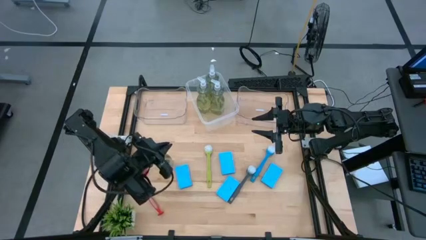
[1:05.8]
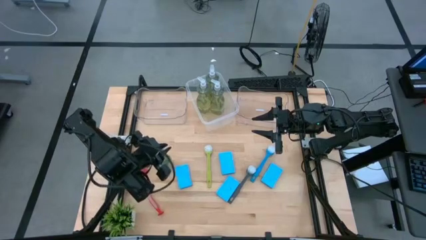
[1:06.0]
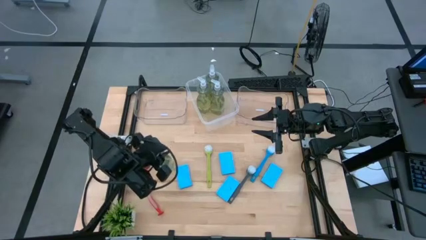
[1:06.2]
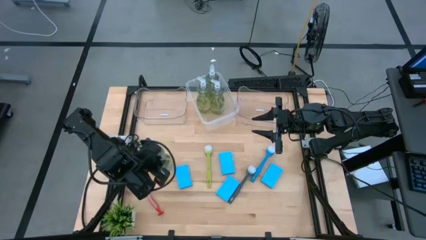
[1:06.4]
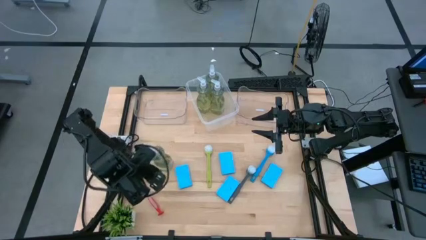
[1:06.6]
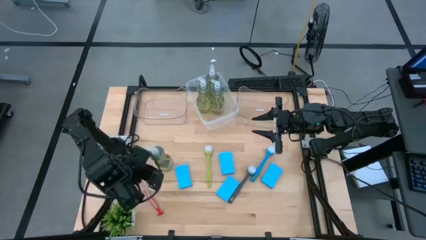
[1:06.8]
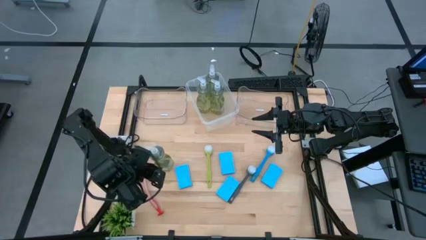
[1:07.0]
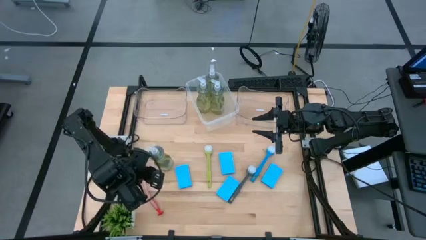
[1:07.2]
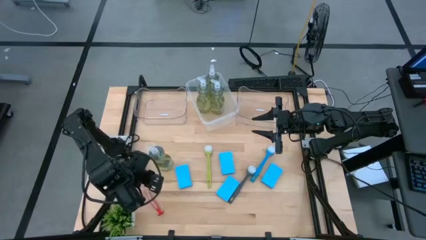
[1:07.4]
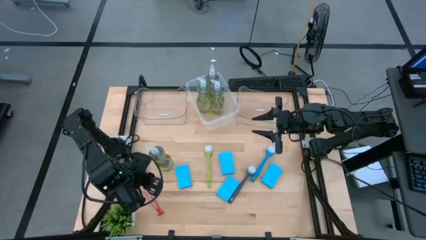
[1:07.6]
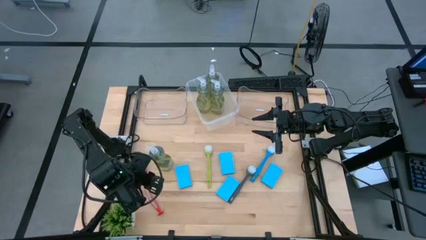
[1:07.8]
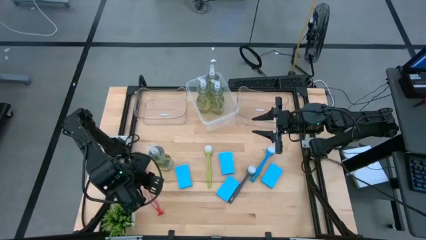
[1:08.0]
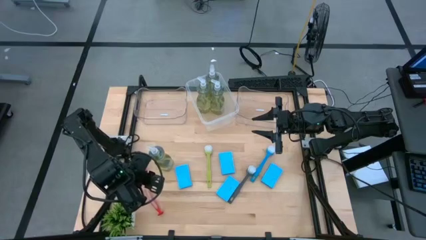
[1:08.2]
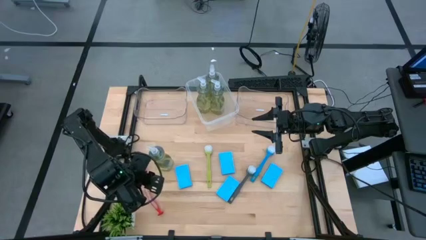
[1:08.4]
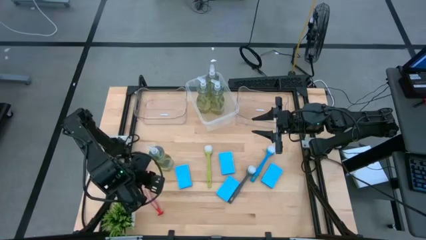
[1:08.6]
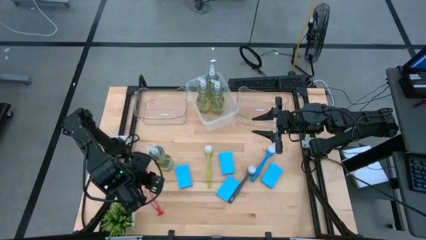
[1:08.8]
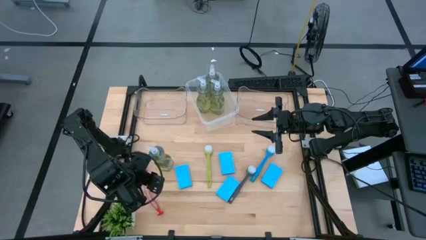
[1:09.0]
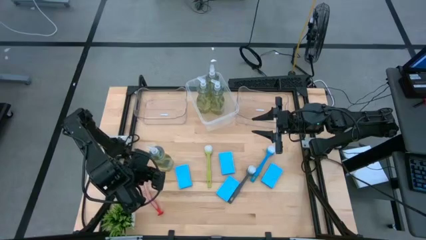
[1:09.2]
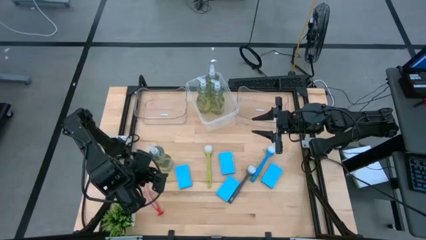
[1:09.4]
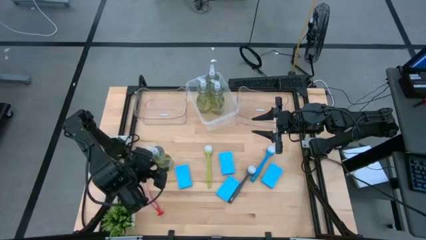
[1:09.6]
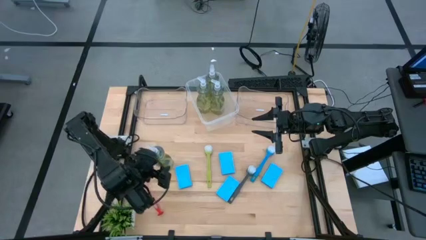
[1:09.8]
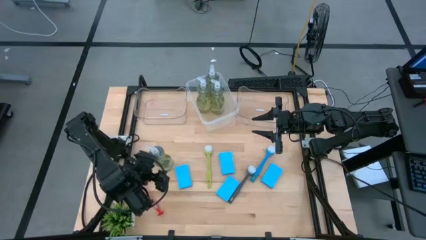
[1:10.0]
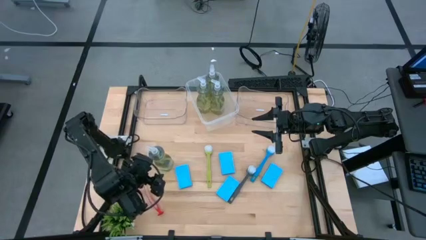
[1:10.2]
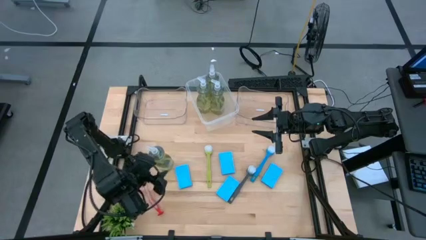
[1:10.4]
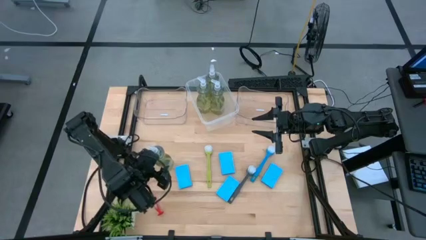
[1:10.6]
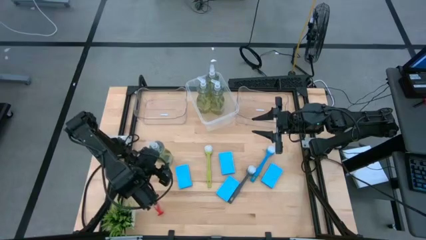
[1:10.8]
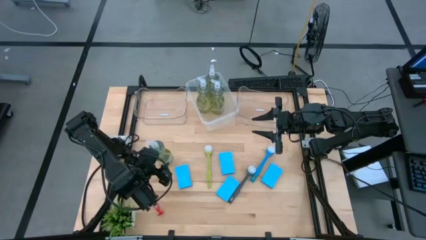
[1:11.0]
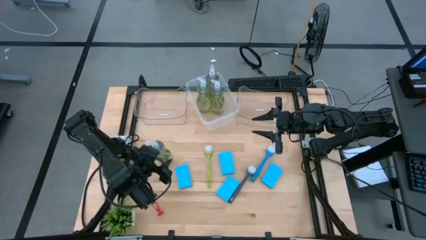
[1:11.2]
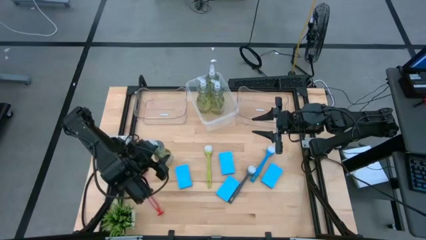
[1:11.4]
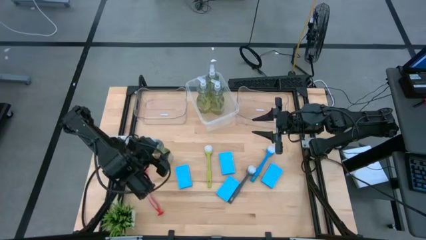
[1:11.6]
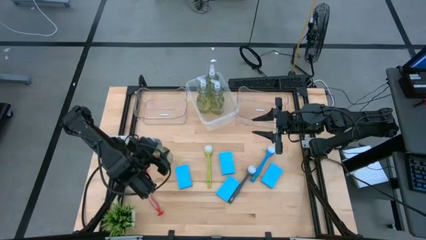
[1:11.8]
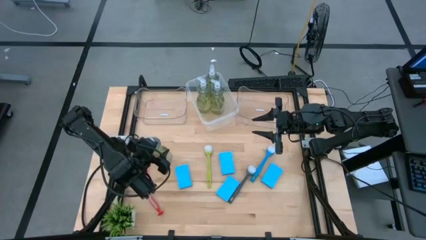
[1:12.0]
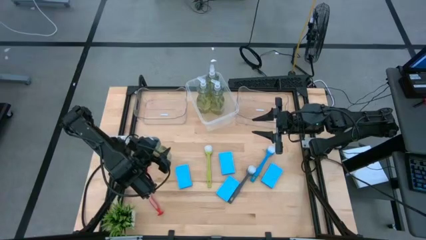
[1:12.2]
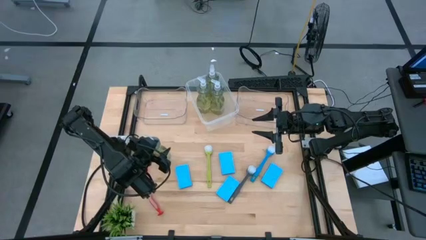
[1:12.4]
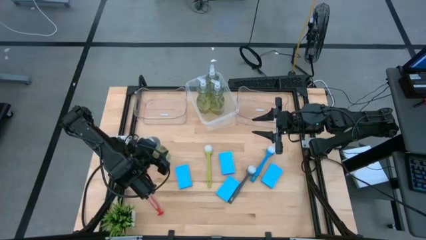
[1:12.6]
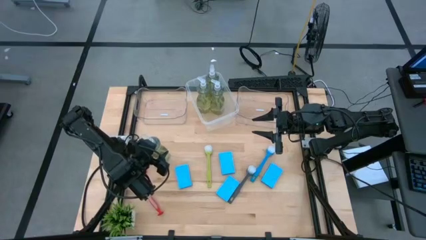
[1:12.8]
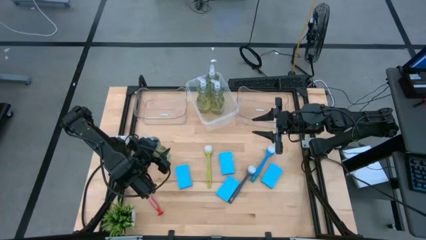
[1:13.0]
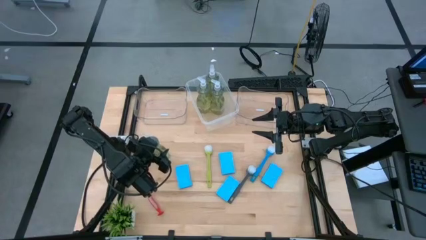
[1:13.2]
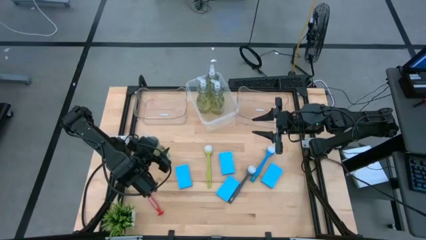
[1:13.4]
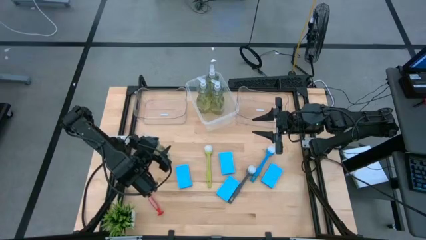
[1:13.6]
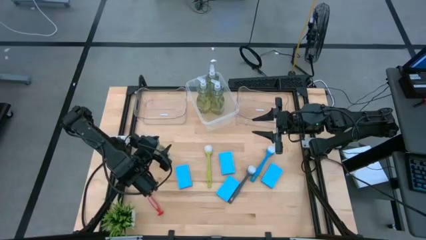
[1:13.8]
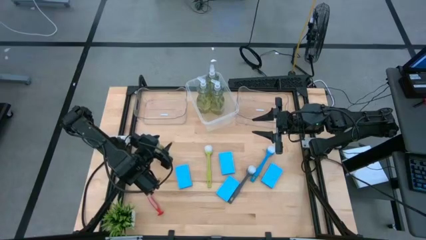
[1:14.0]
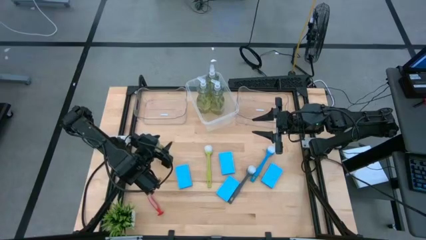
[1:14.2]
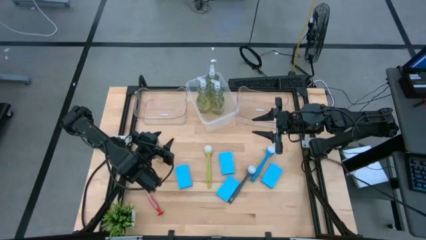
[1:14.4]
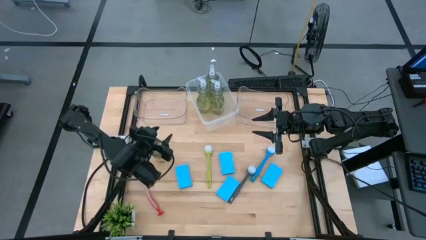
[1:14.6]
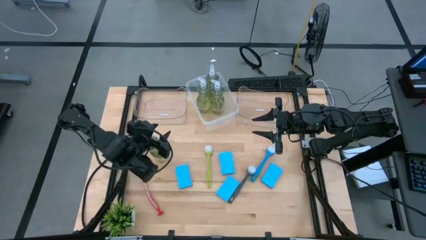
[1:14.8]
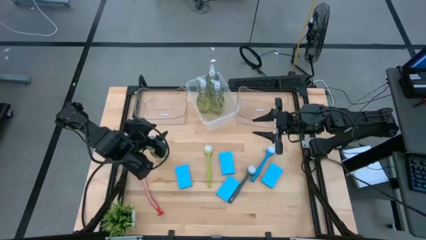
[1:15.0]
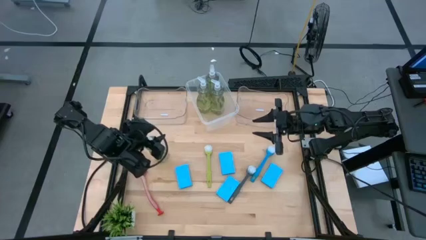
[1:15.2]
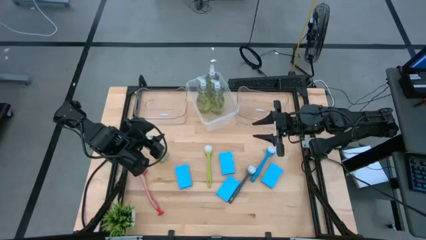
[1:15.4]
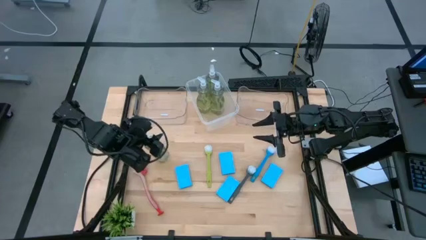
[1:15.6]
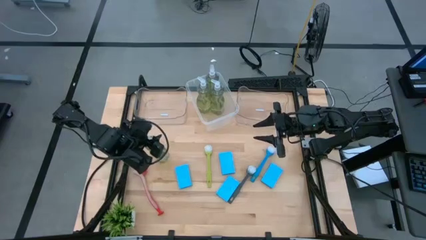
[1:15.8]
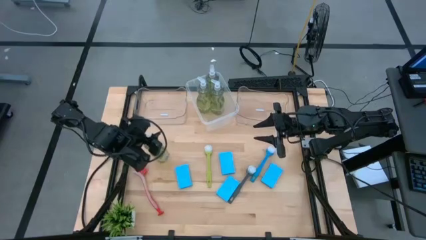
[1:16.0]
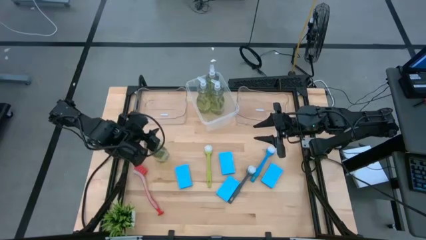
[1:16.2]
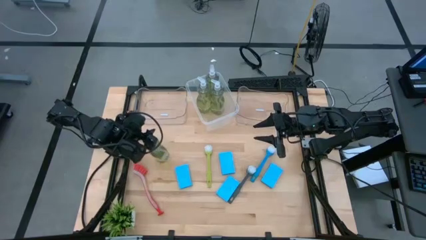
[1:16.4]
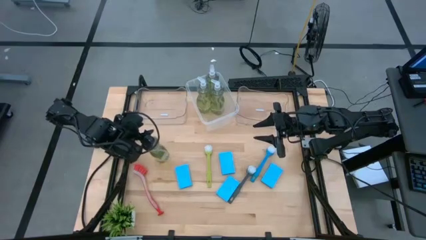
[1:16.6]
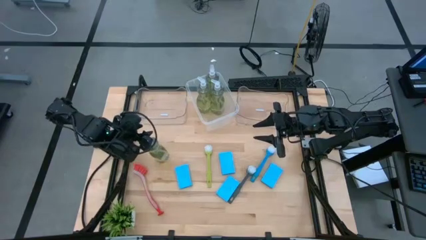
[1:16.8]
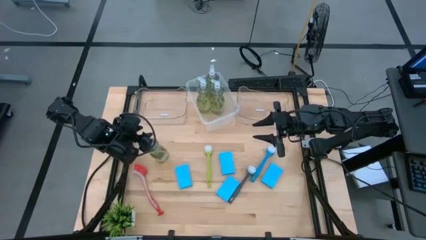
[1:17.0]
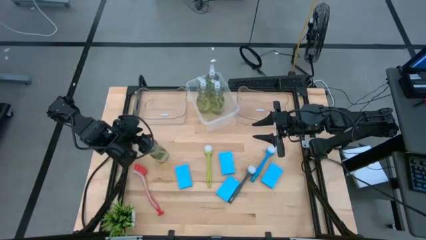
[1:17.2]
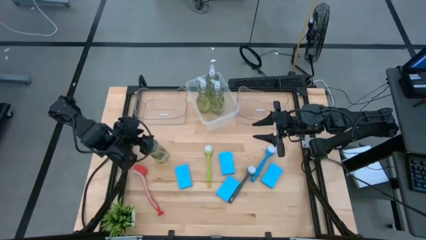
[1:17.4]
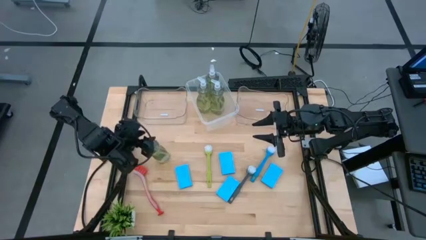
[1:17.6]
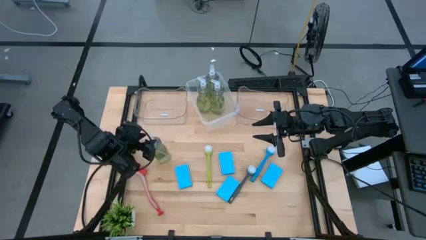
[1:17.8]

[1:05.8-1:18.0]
Task: Pick & Place Kitchen Sink Supplies
Put the liquid dishwashing soap into the middle transparent bin

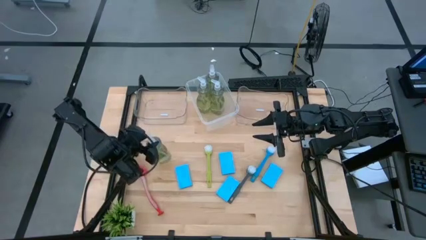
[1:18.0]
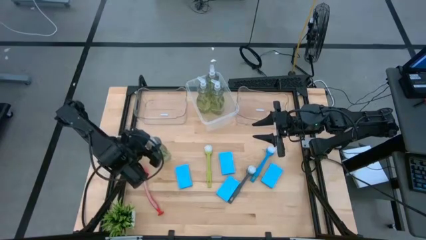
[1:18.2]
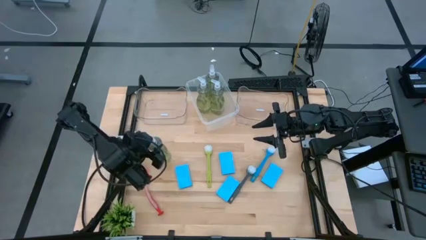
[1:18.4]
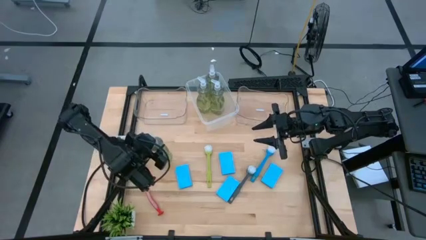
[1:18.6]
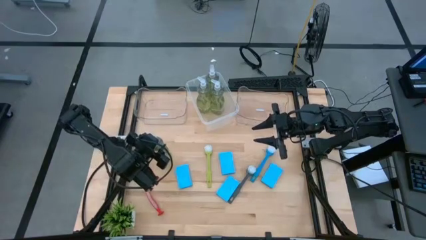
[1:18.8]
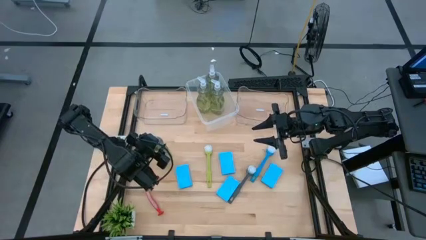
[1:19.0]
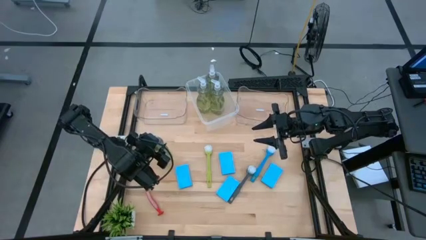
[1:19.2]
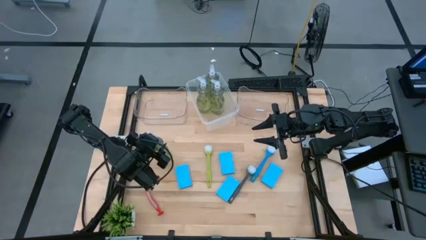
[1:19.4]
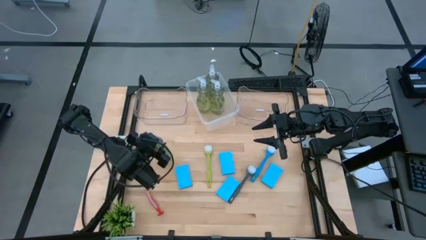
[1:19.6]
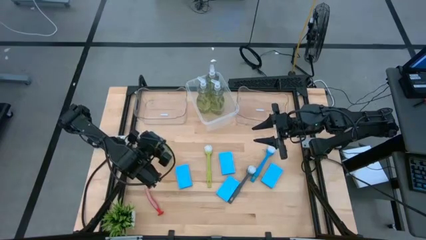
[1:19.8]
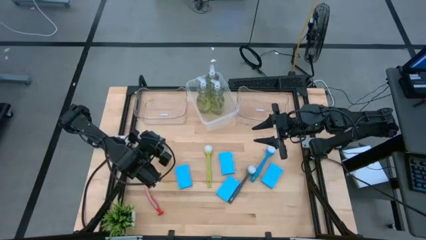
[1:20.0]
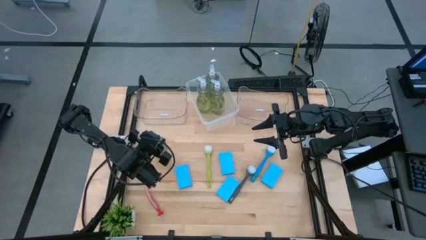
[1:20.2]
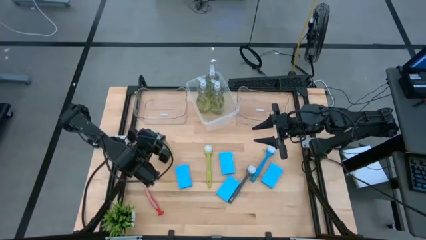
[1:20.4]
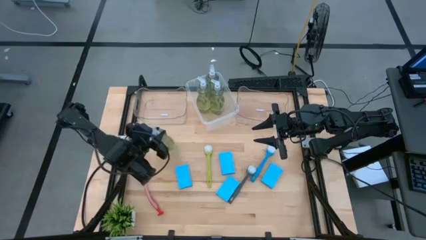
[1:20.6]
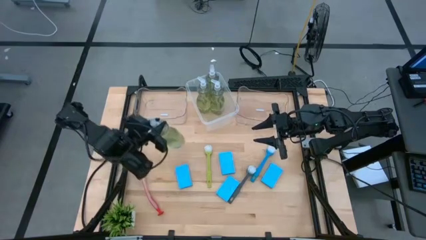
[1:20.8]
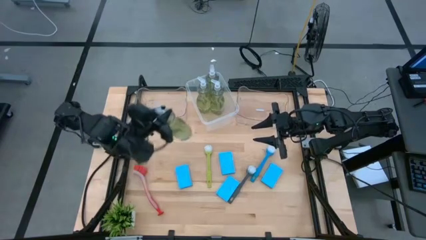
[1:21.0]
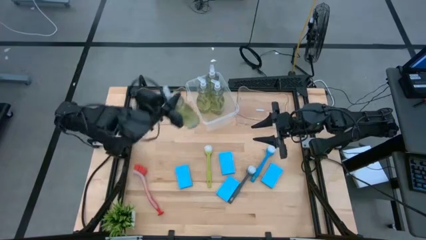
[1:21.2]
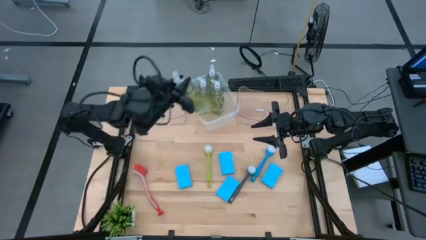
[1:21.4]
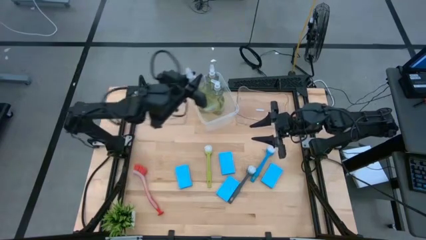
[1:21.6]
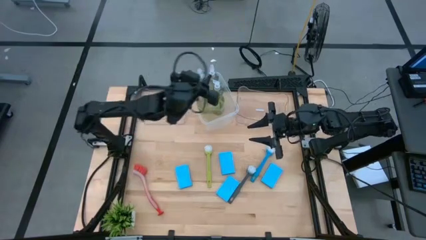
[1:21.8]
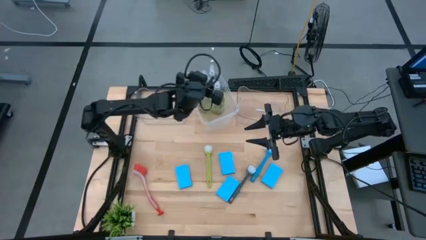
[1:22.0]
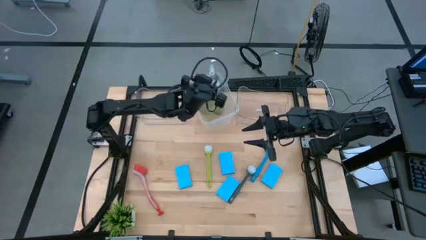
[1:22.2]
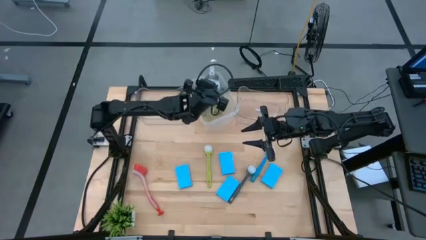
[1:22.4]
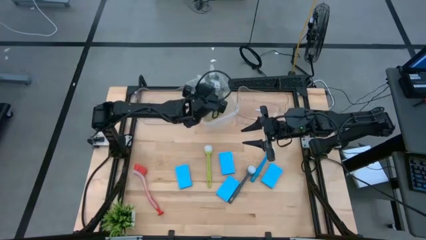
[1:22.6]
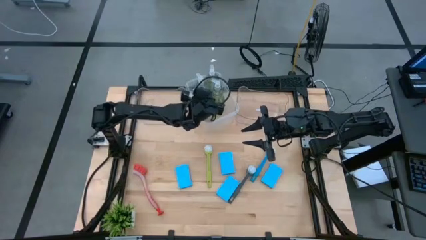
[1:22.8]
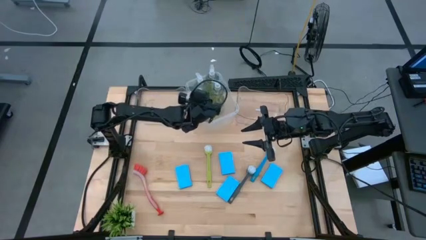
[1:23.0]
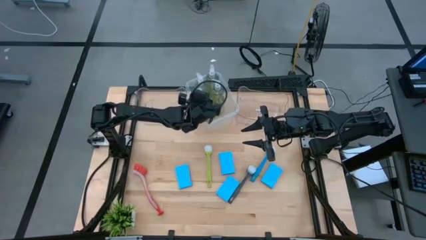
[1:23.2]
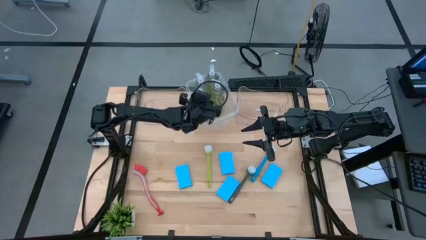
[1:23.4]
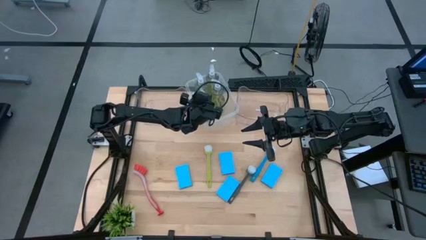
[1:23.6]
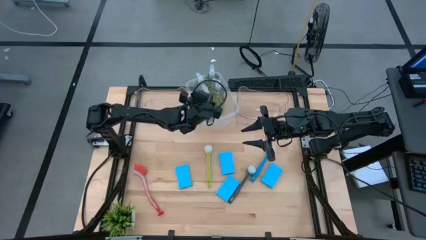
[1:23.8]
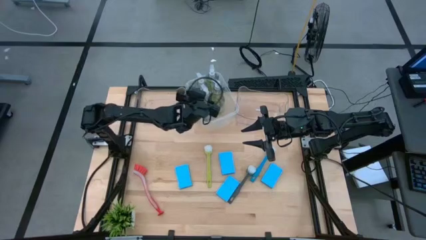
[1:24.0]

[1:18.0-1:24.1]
Put the liquid dishwashing soap into the middle transparent bin
